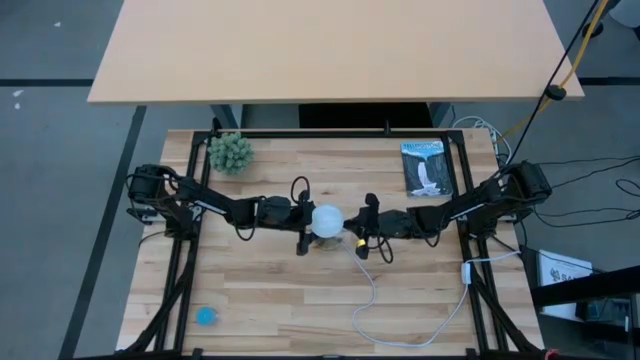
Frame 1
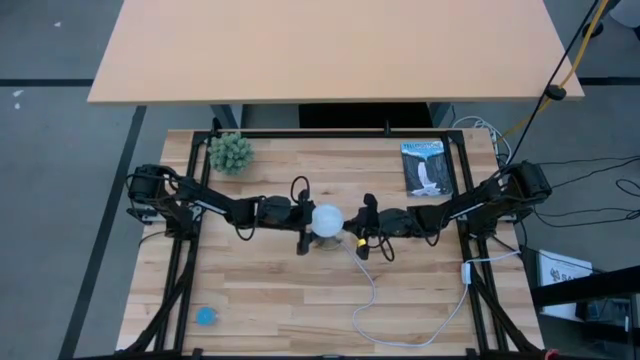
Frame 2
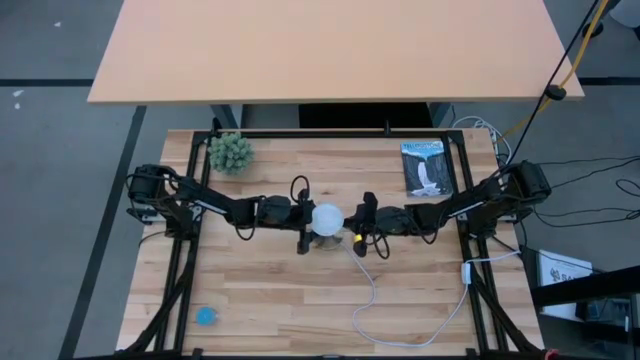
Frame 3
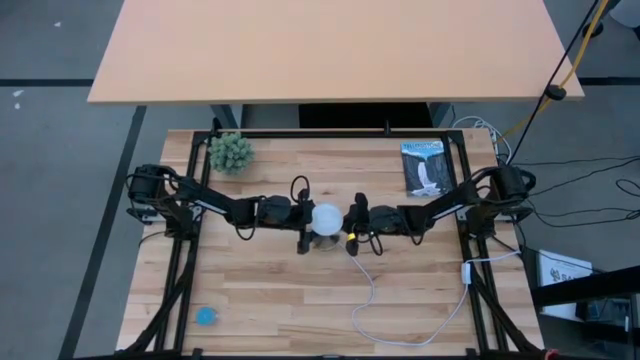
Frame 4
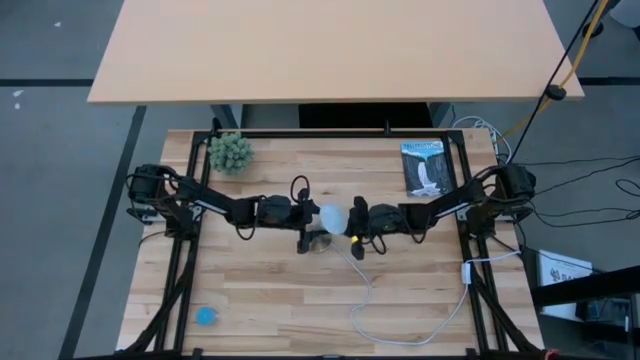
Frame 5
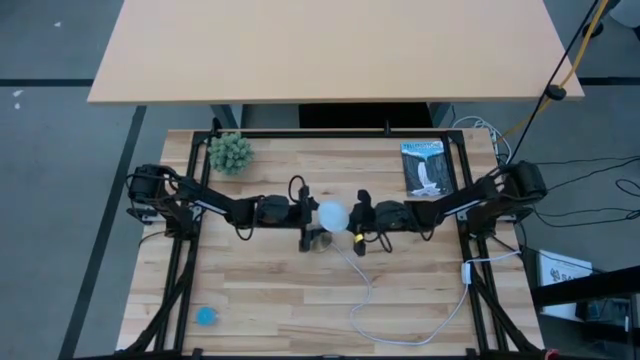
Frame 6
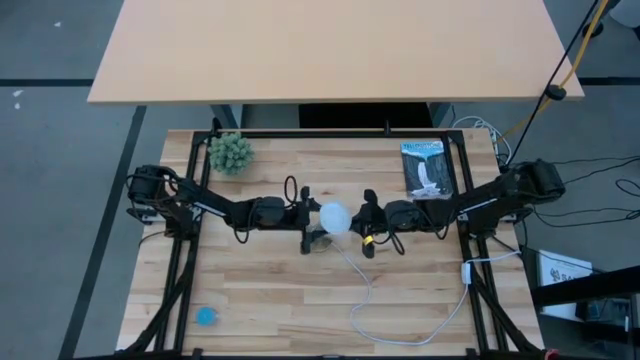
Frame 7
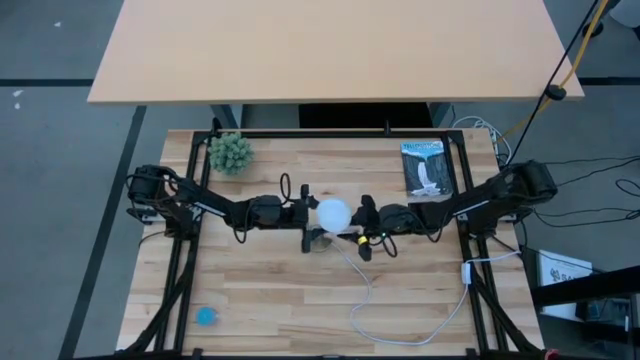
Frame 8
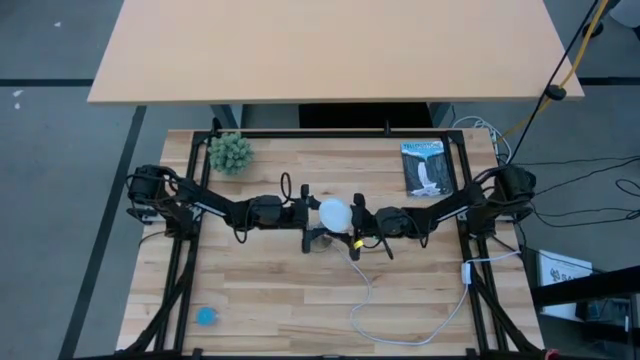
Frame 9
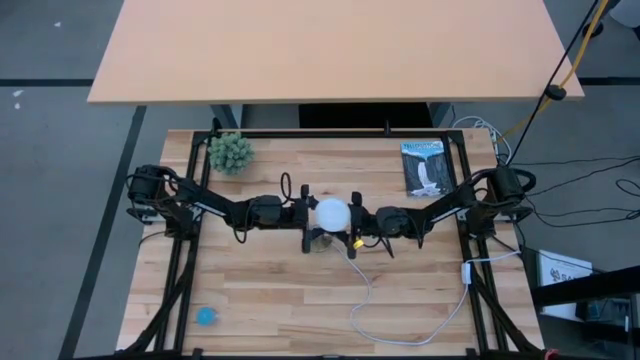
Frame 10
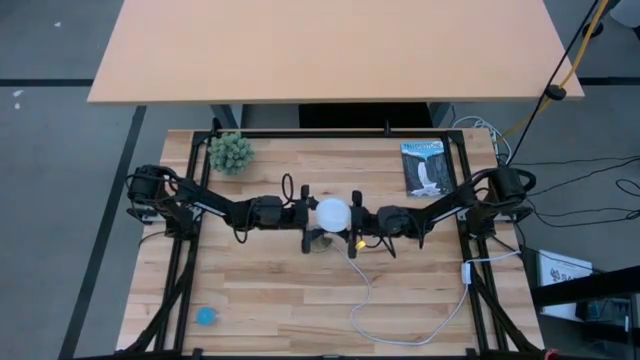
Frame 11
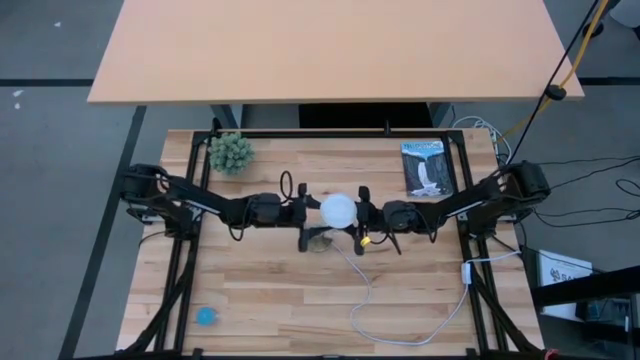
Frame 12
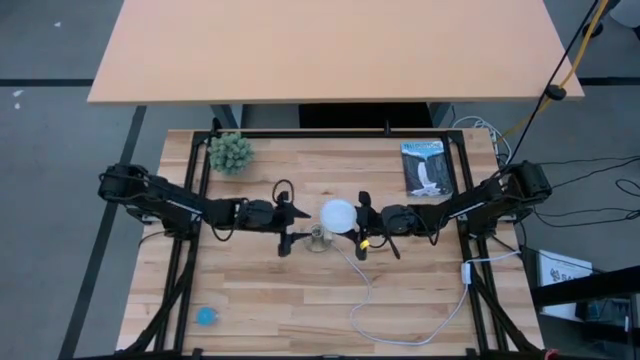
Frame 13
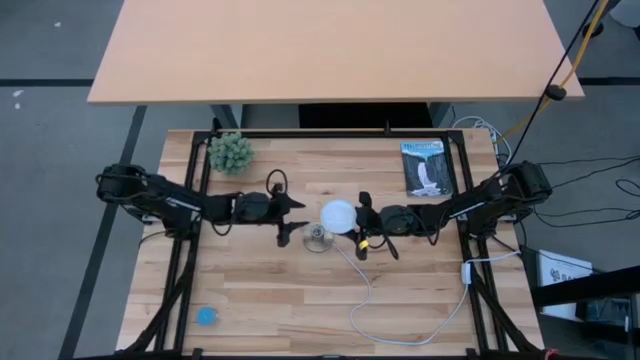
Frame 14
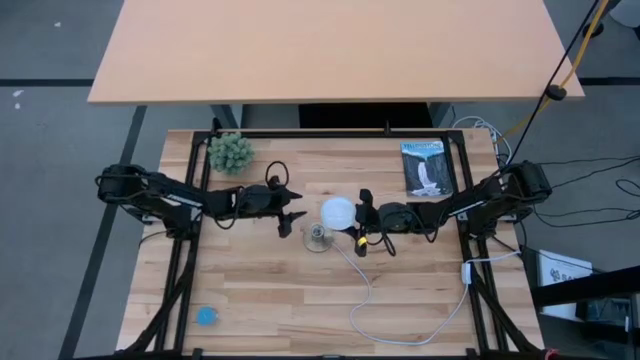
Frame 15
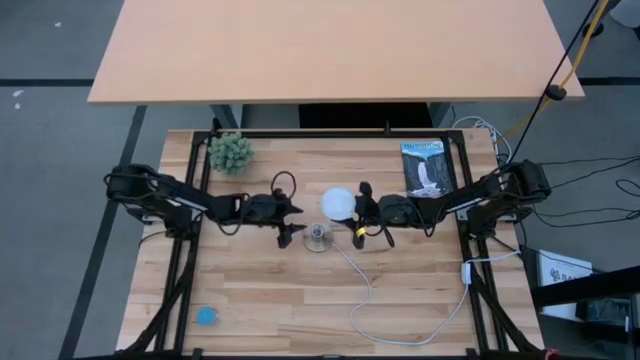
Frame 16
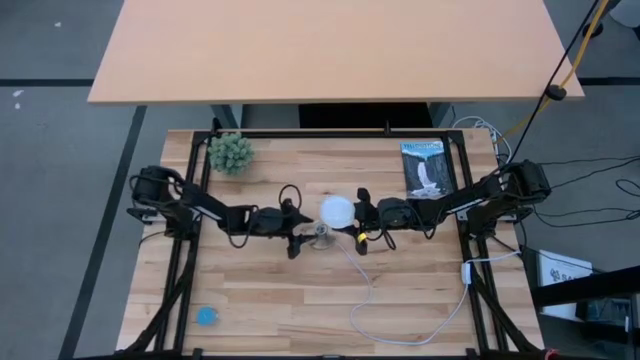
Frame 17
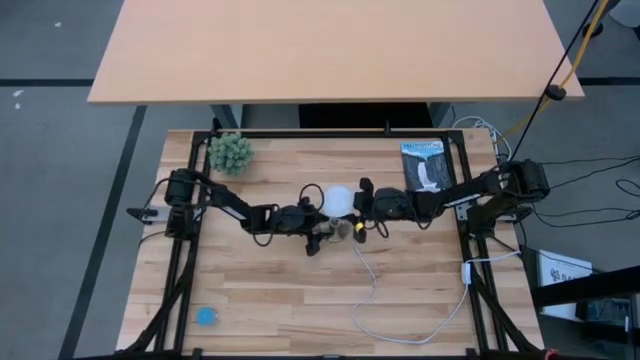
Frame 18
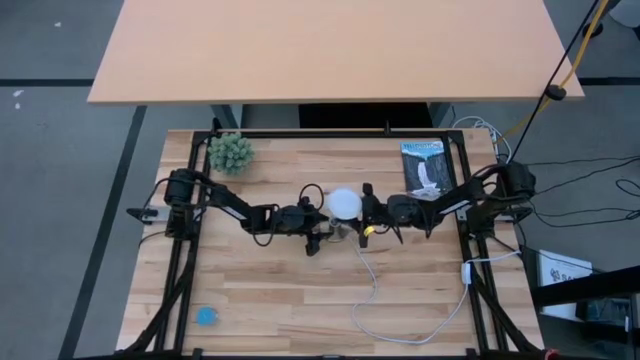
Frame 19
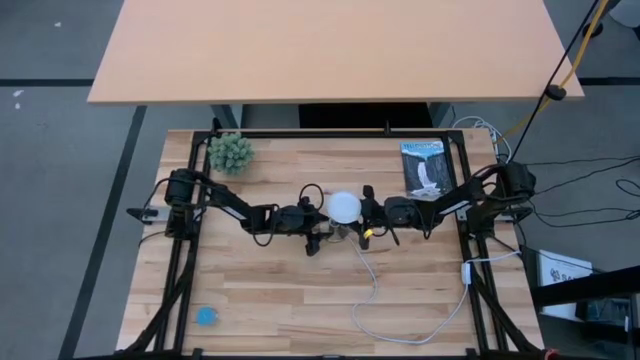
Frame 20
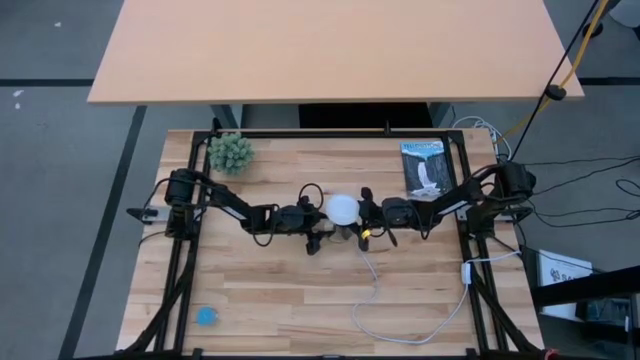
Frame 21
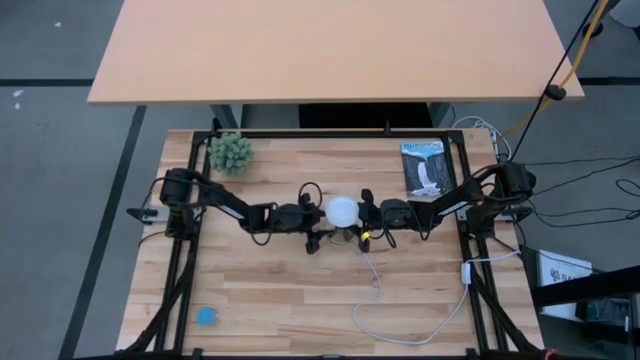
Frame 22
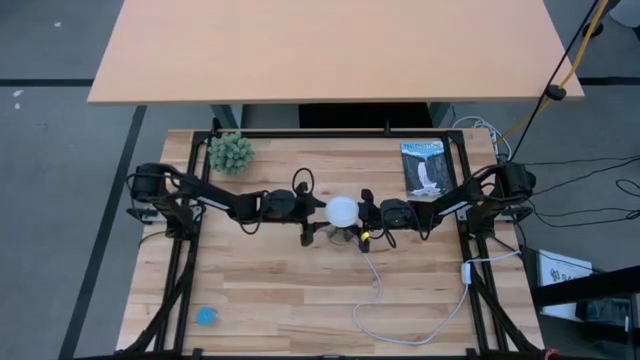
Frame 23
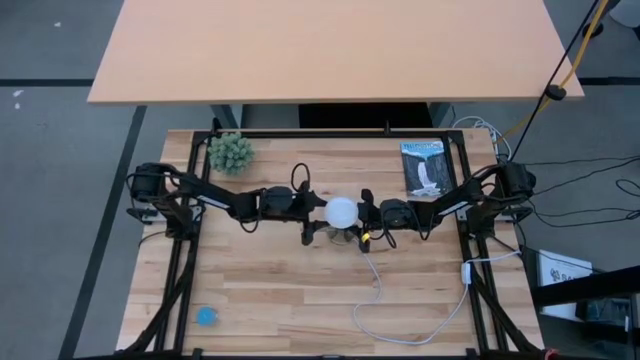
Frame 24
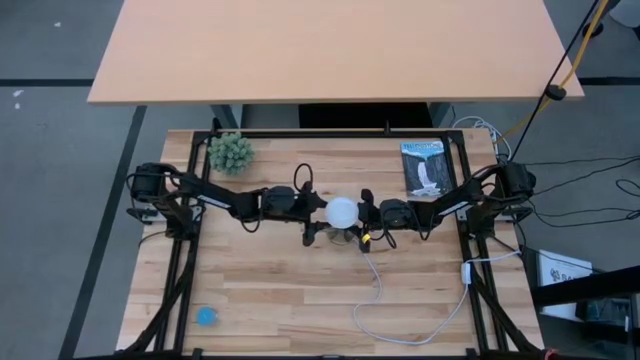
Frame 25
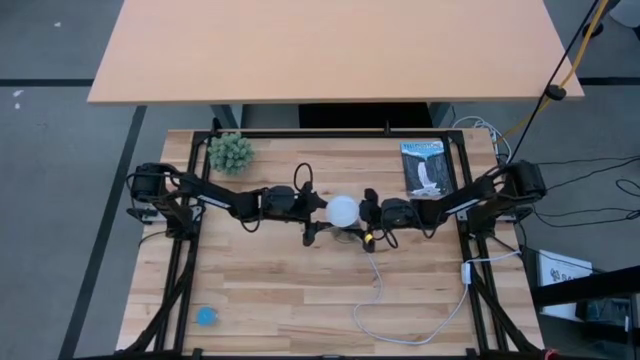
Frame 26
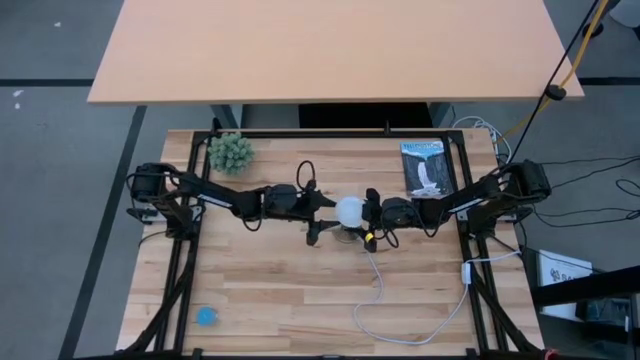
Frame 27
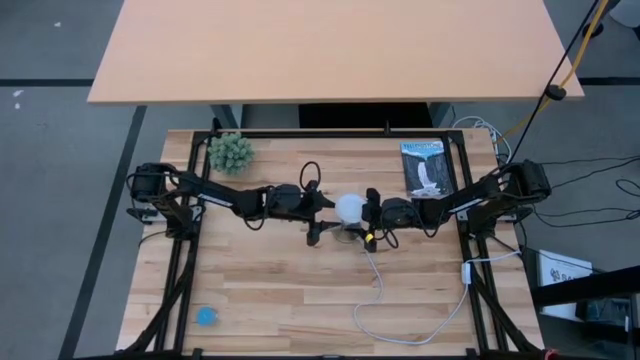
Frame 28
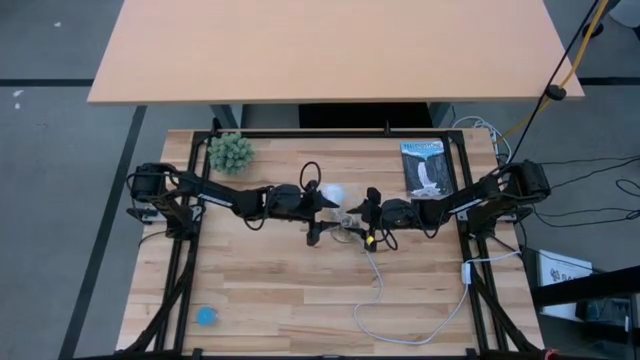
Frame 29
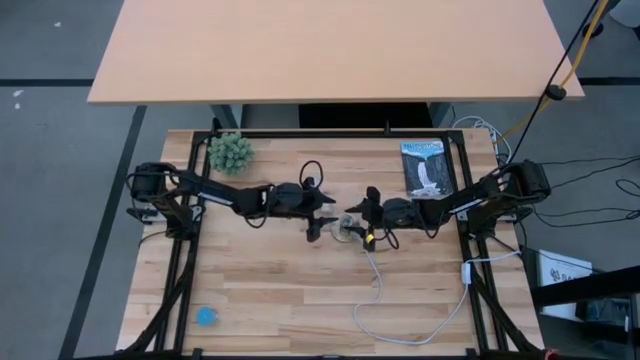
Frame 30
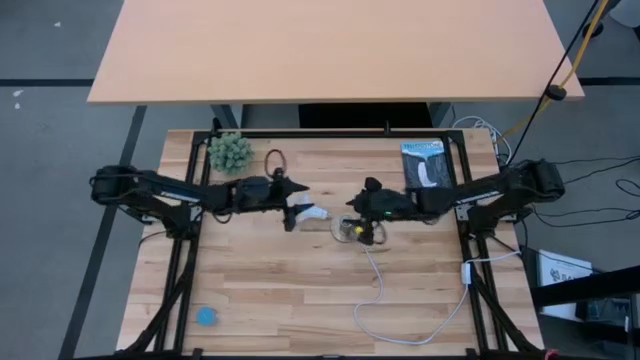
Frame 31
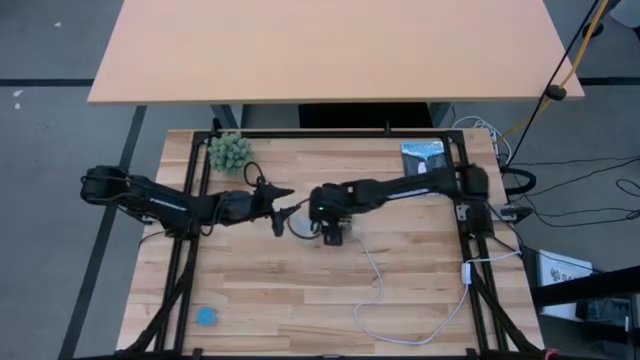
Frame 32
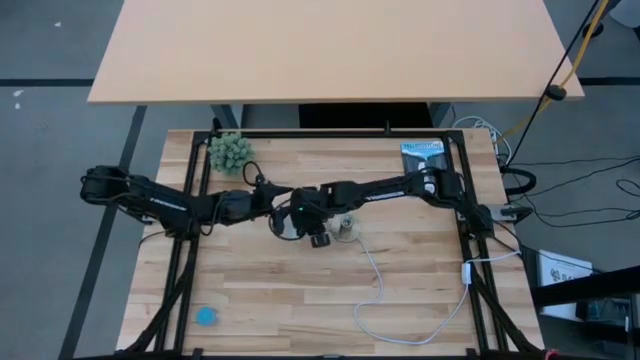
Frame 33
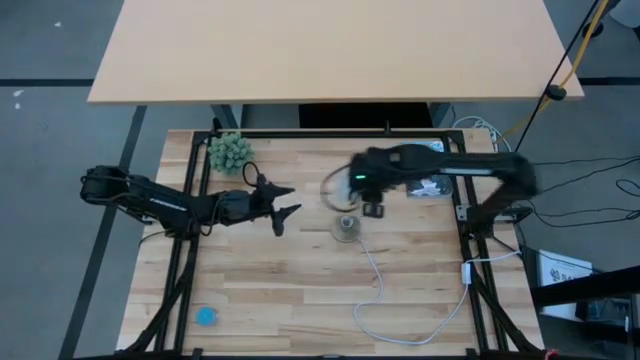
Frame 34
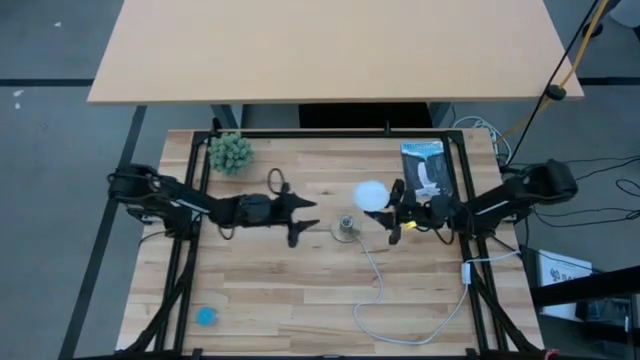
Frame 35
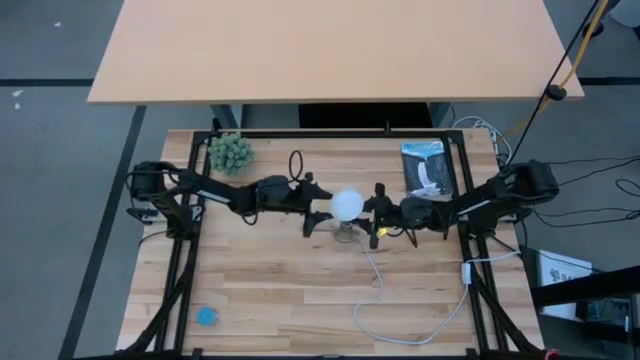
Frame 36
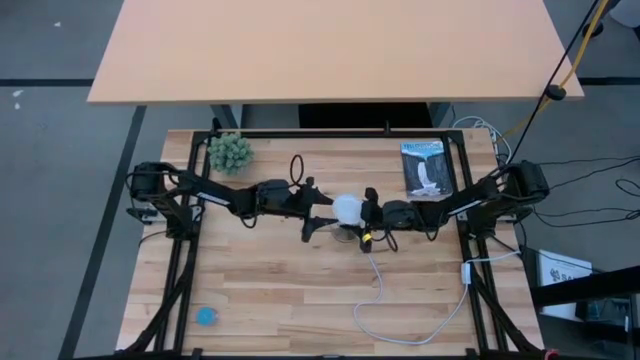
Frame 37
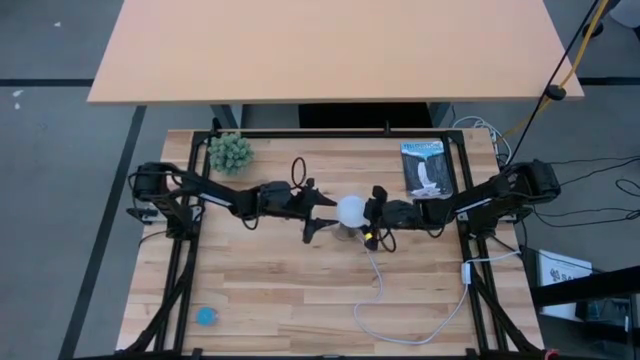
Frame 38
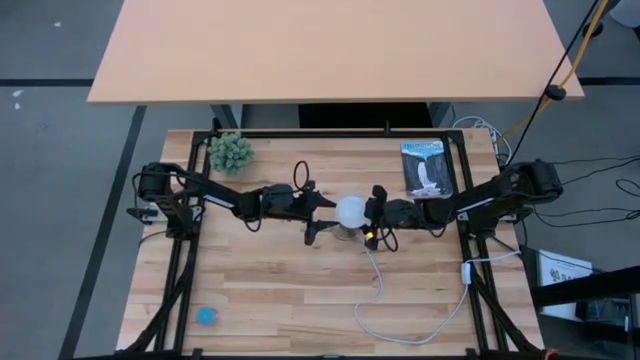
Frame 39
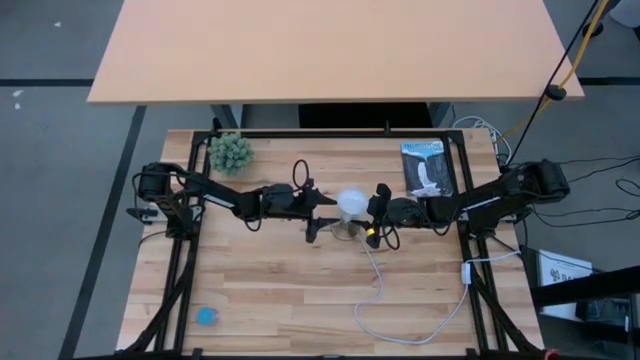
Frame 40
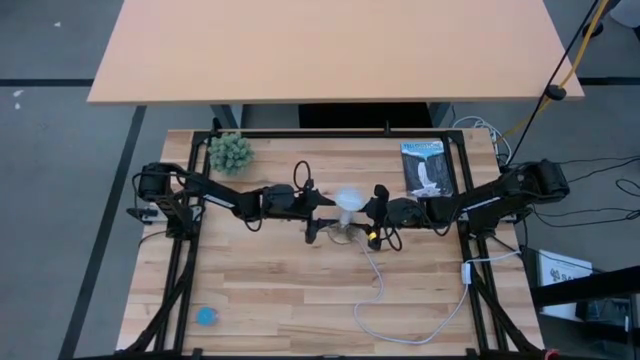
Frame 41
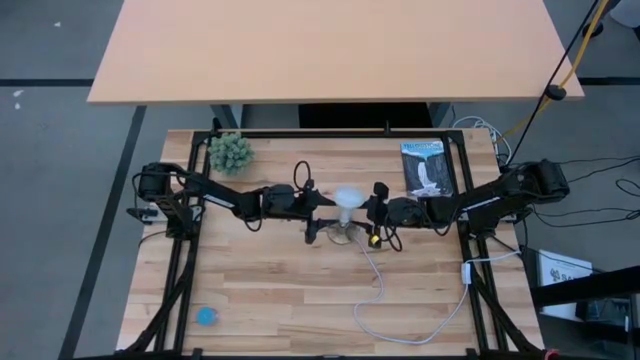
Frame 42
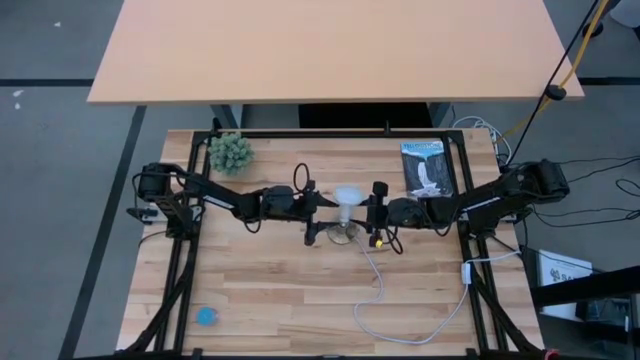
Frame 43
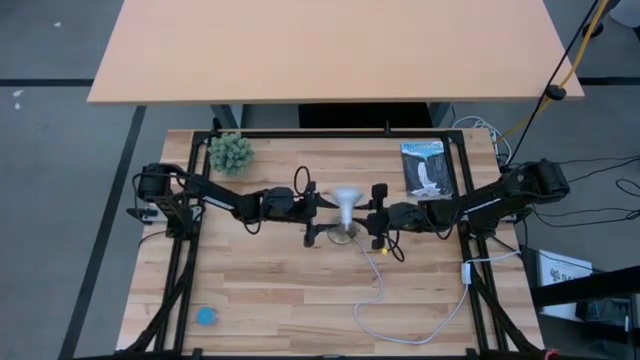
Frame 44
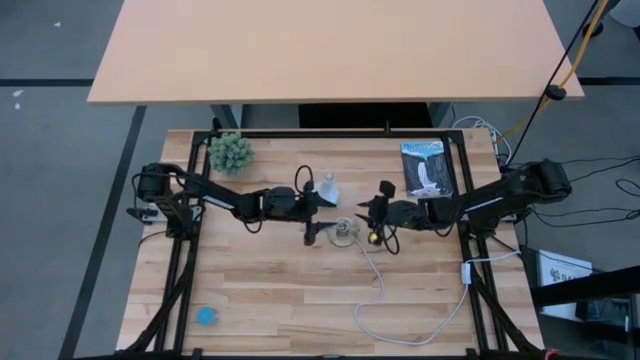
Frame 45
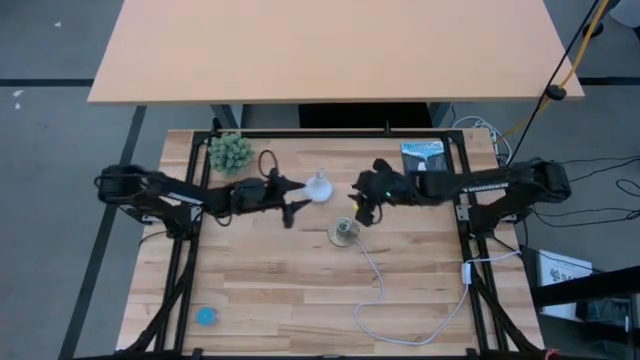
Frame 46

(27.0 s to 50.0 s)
Task: Screw lightbulb
Insert the white light bulb into the gold lamp
